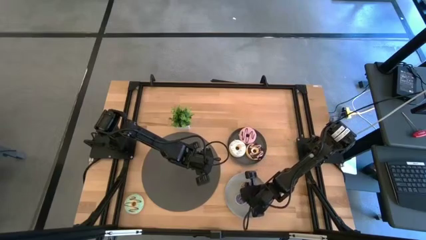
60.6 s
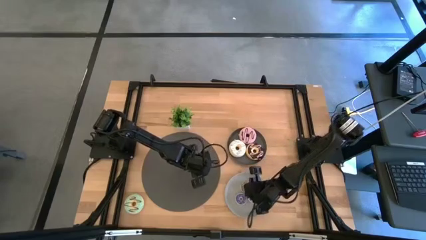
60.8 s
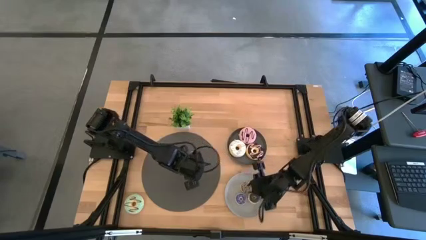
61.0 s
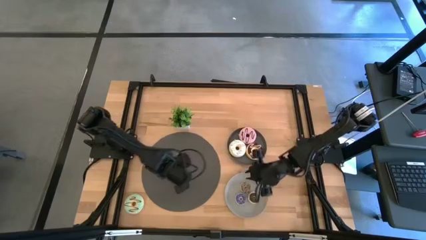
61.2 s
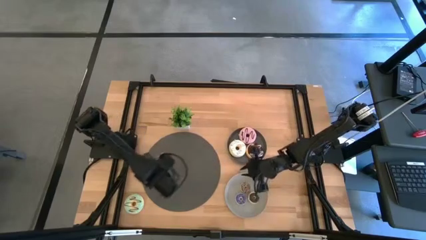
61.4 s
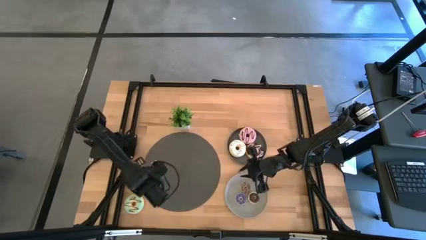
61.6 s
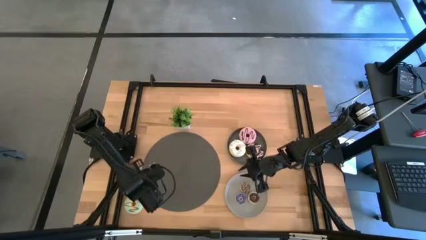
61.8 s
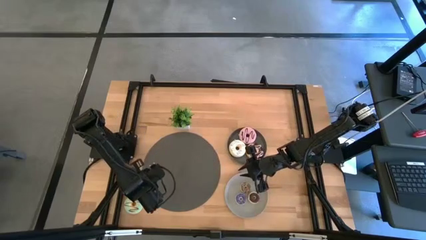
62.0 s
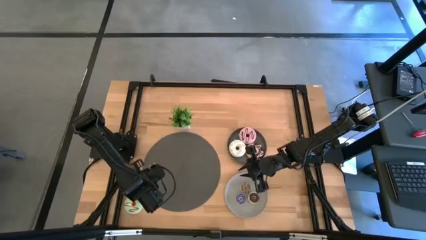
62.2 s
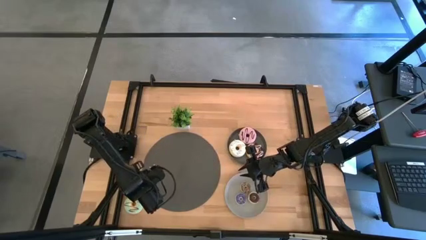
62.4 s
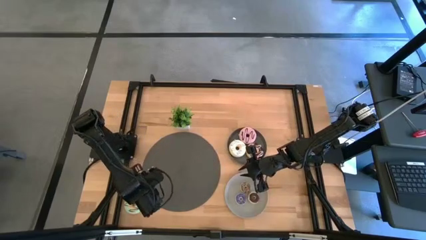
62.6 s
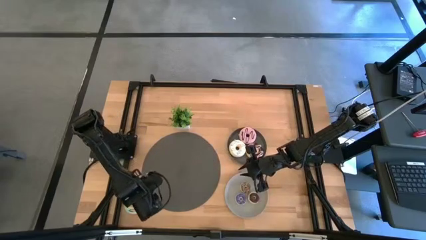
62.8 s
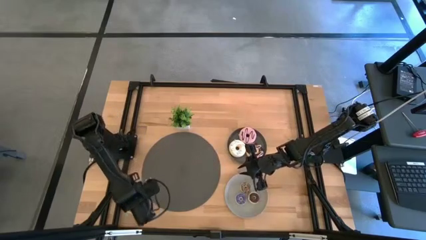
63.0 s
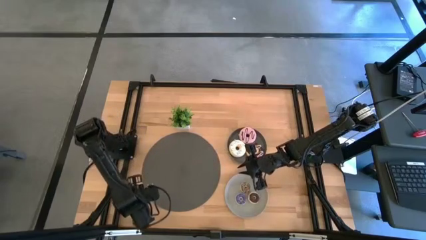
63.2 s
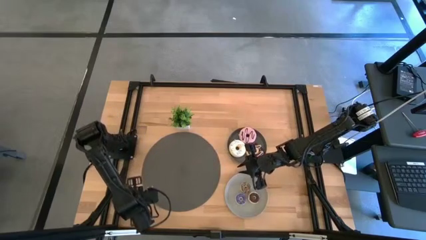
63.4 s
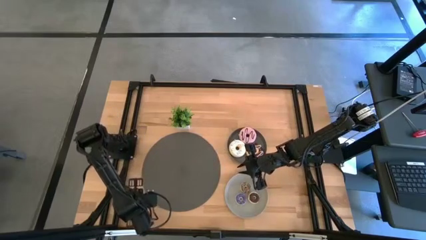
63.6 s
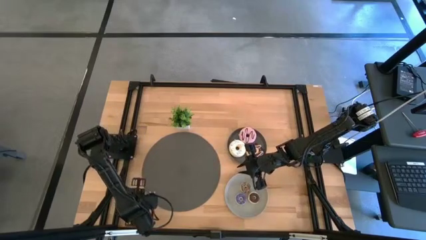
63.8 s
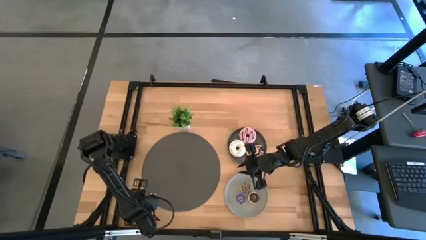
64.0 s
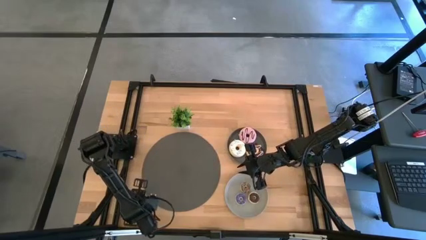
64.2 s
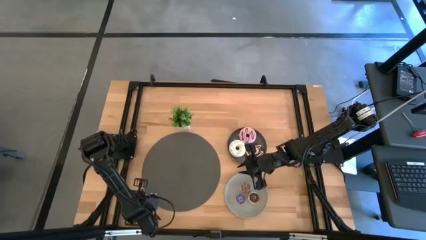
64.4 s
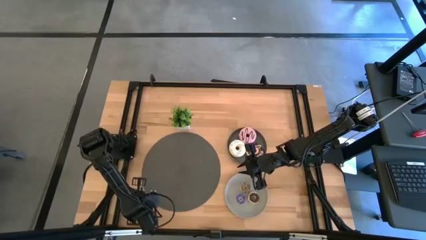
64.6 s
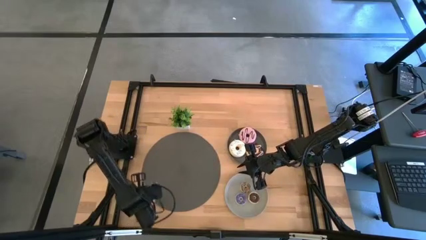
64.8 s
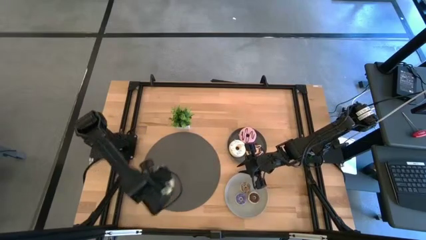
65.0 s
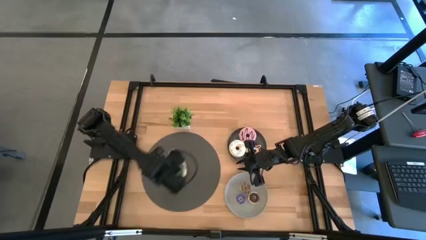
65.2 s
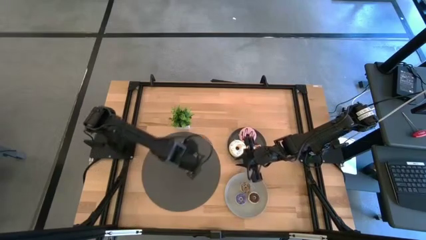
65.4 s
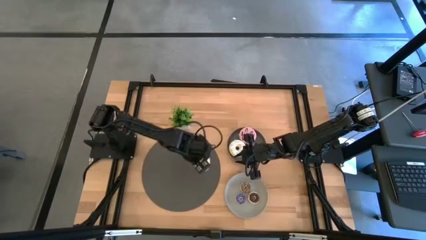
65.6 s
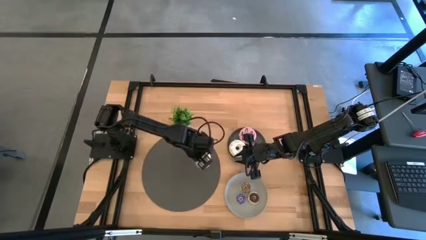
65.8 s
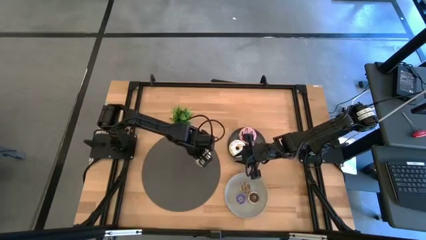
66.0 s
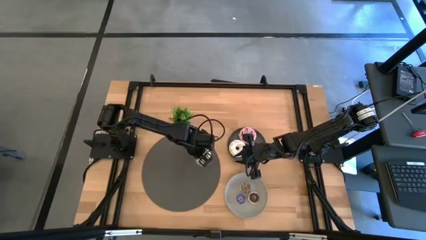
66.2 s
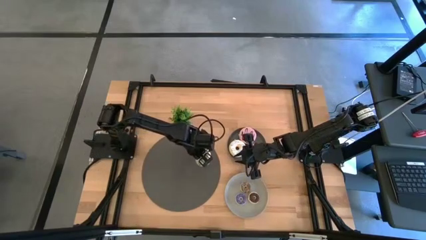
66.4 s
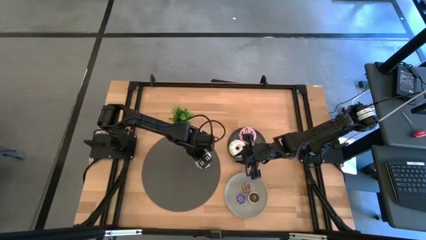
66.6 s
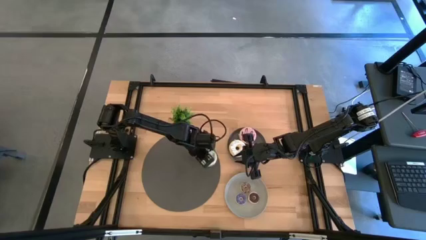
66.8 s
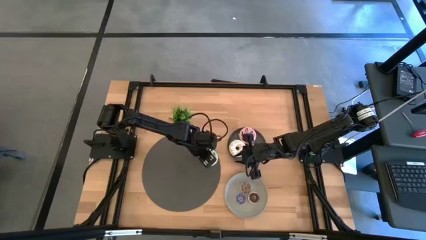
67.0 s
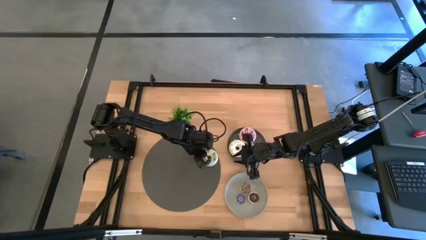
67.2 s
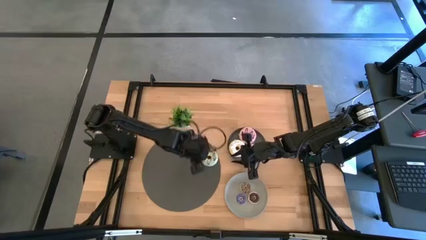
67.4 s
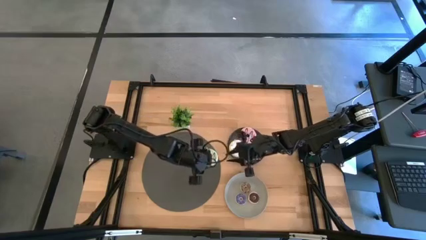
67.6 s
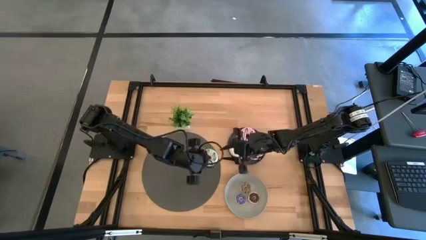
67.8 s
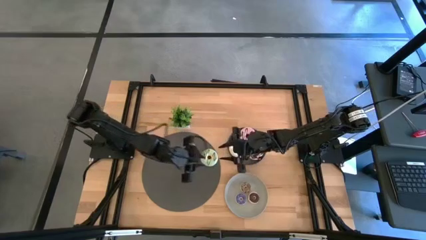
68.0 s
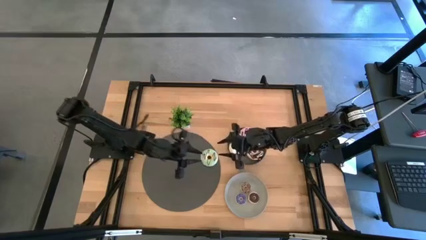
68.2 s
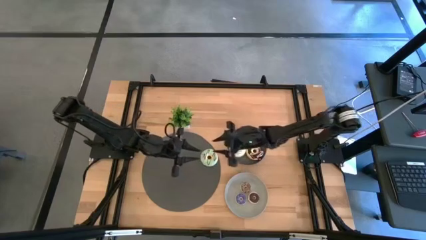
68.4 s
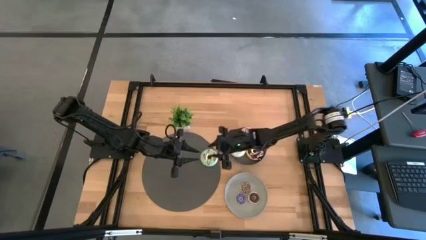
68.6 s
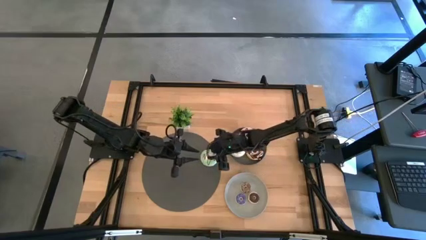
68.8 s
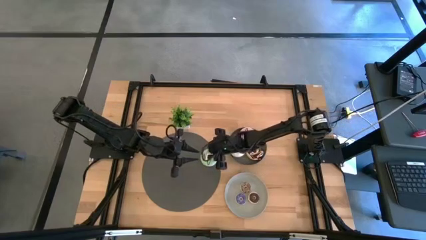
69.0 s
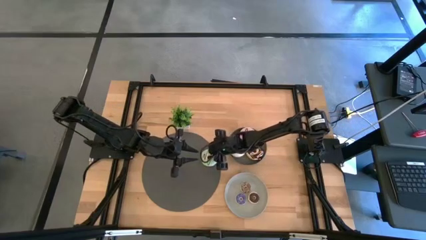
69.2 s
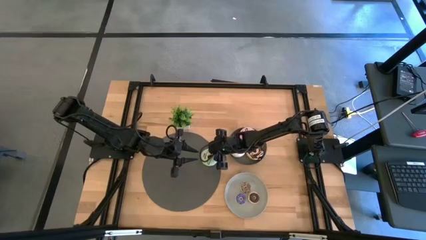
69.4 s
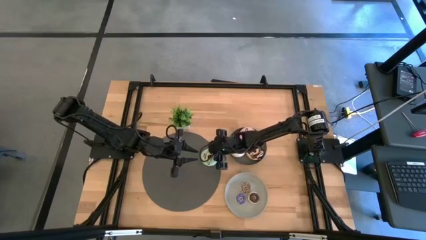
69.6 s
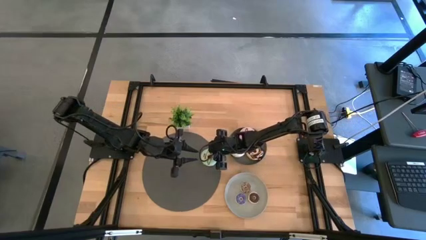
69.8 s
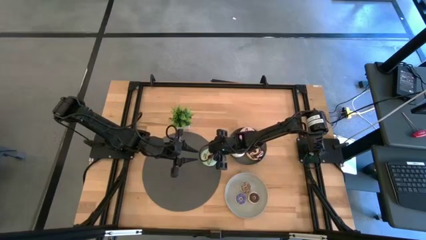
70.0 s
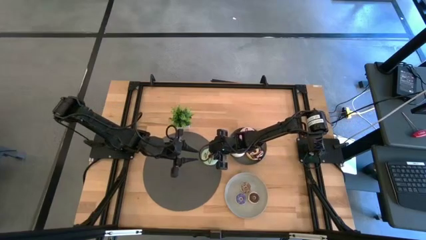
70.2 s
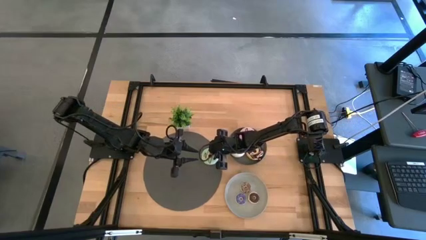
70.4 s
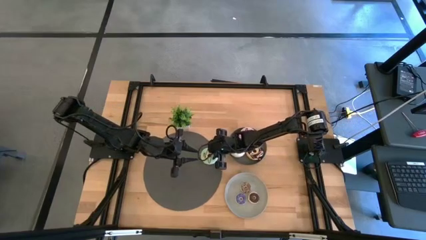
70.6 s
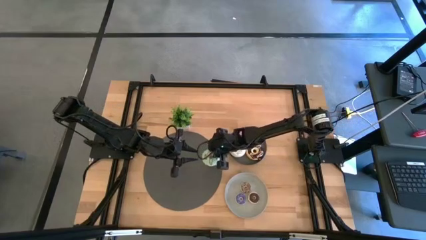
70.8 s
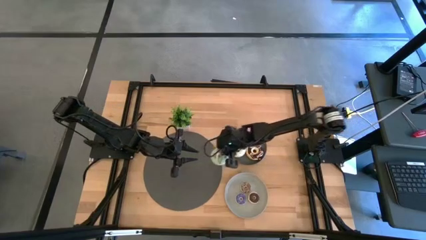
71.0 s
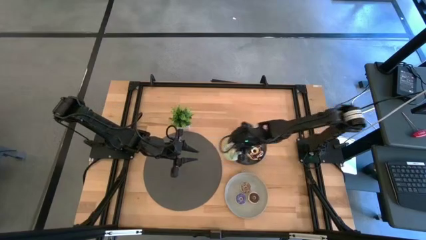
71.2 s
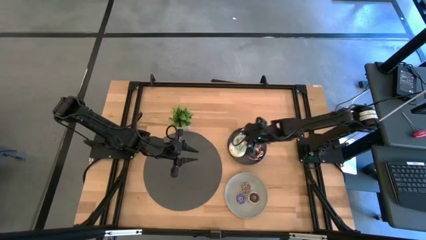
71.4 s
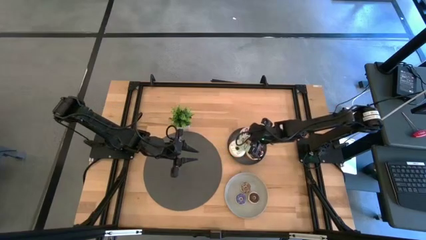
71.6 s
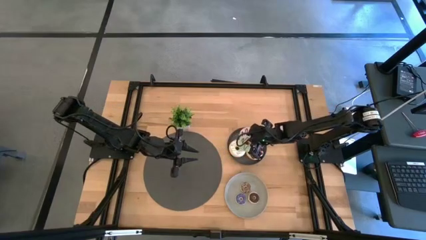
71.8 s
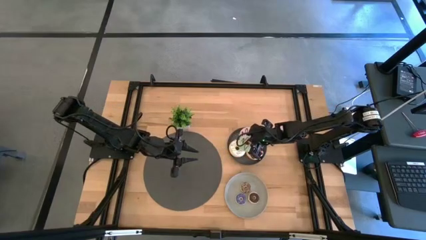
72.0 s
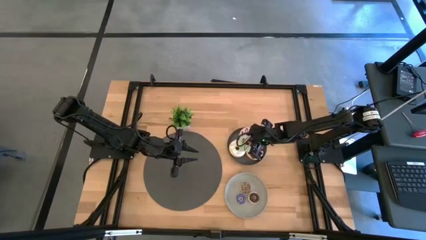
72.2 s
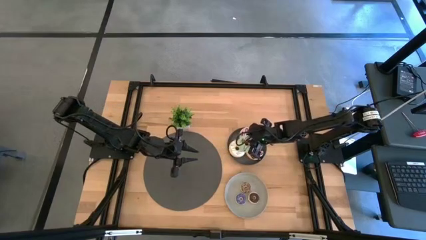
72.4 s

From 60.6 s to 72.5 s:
Task: Pick & Place donuts
Put the large light blue donut on the black plate

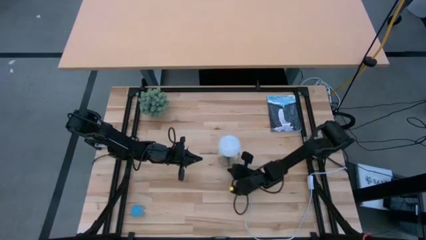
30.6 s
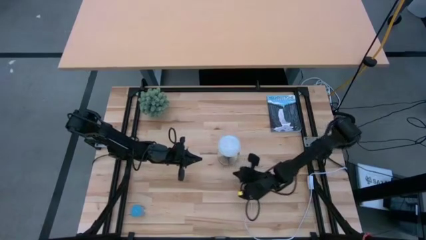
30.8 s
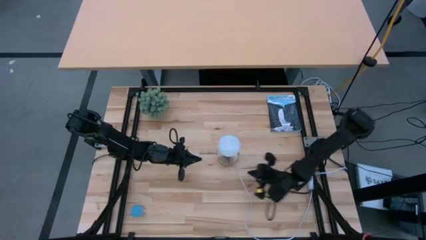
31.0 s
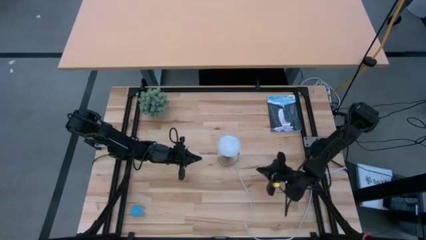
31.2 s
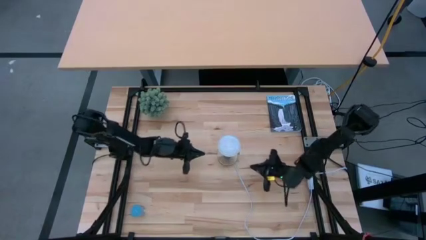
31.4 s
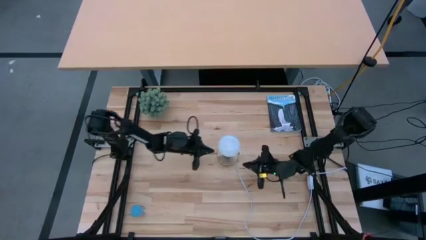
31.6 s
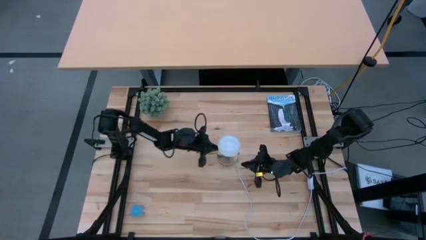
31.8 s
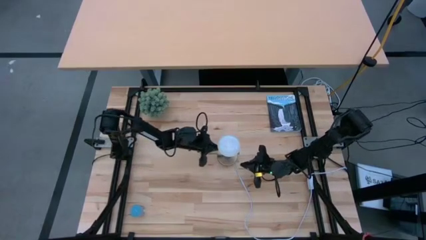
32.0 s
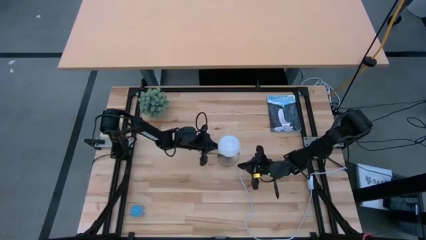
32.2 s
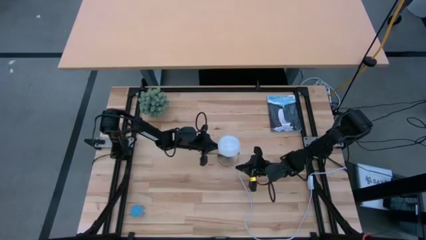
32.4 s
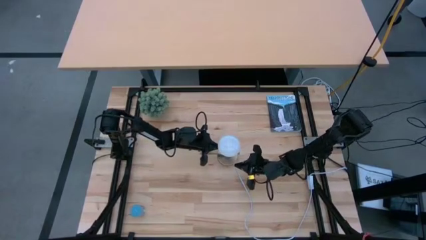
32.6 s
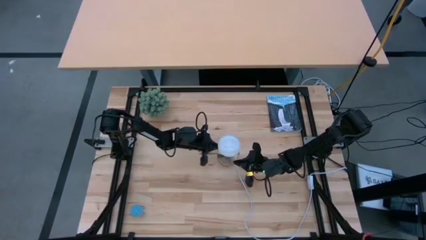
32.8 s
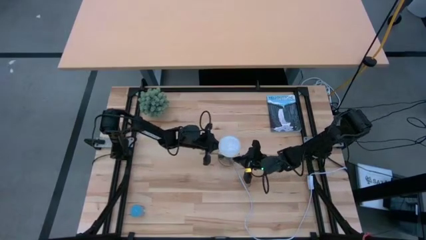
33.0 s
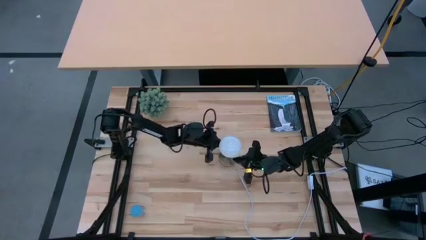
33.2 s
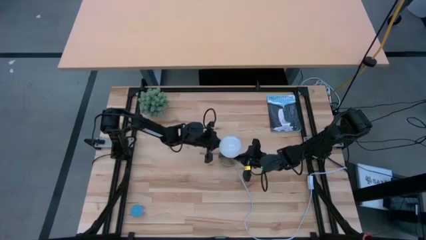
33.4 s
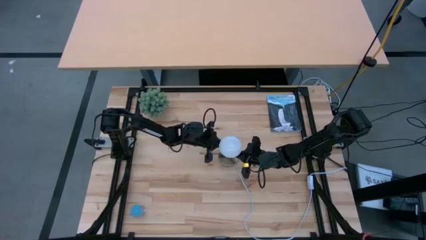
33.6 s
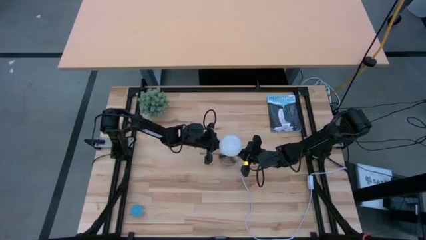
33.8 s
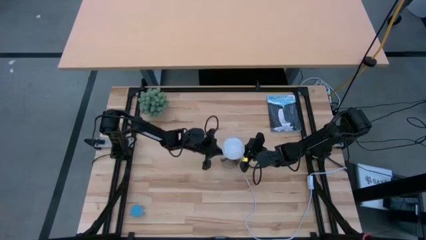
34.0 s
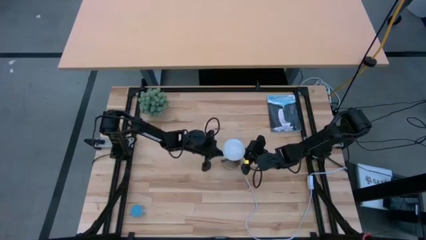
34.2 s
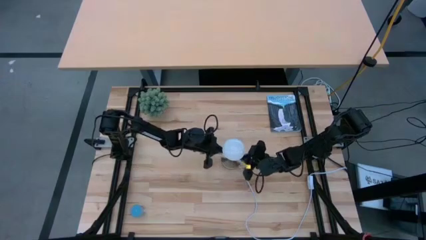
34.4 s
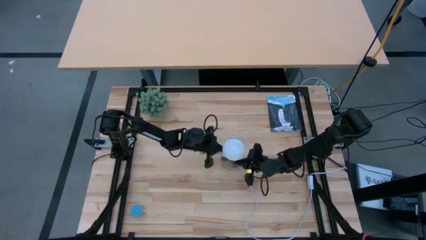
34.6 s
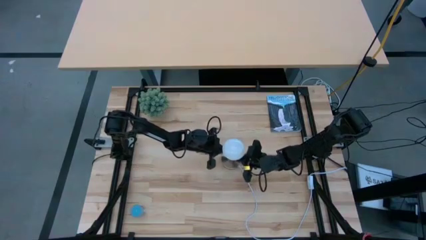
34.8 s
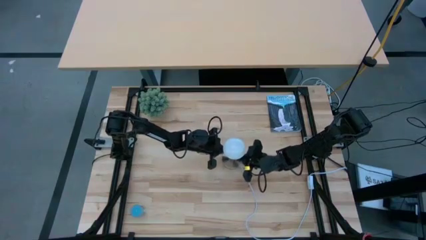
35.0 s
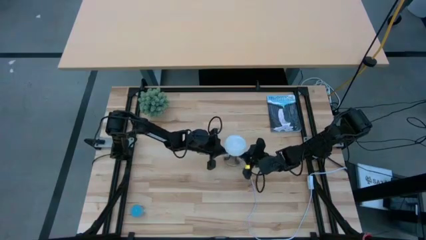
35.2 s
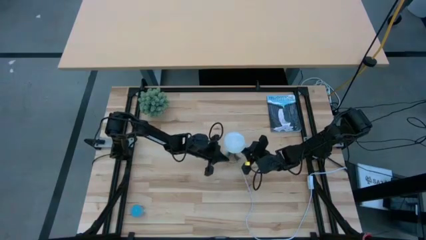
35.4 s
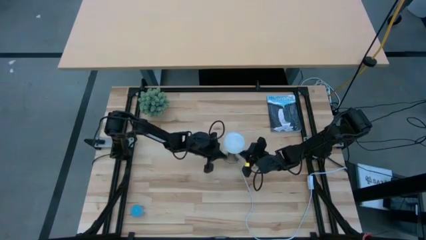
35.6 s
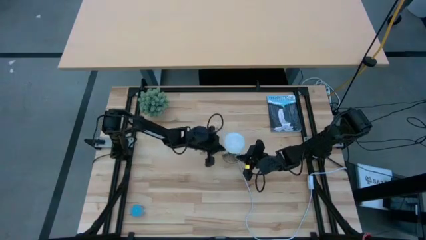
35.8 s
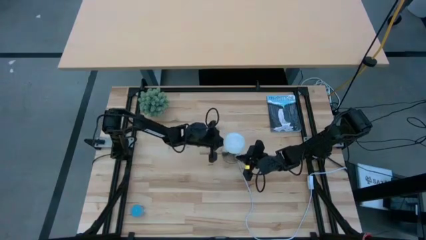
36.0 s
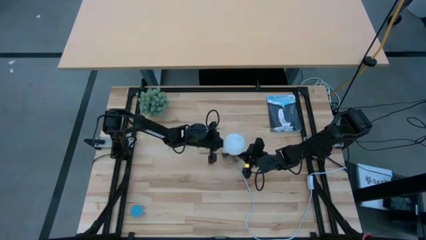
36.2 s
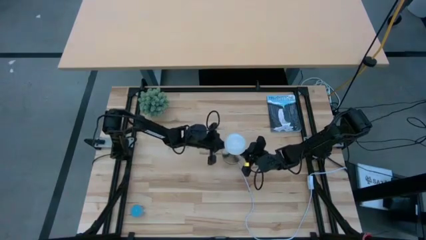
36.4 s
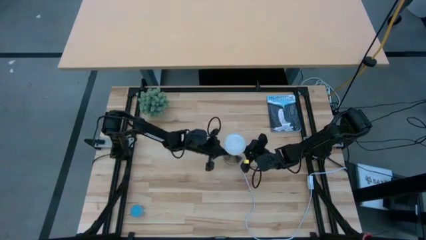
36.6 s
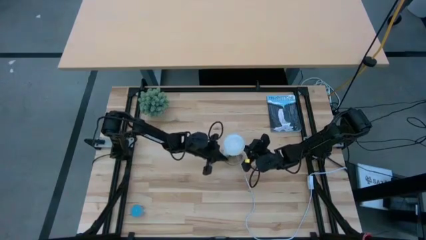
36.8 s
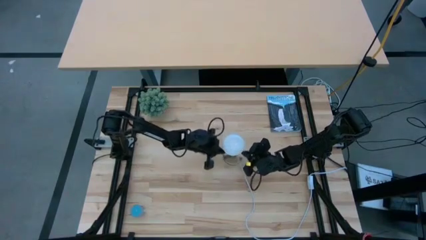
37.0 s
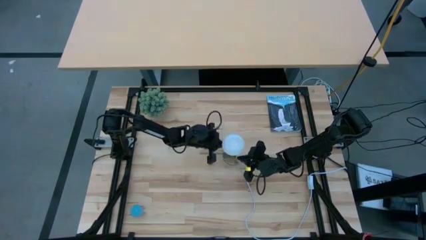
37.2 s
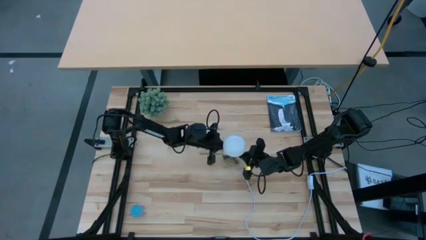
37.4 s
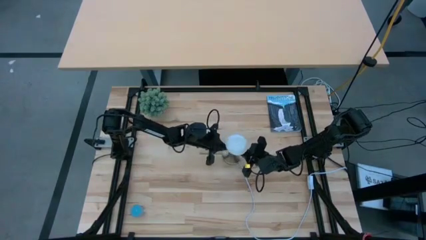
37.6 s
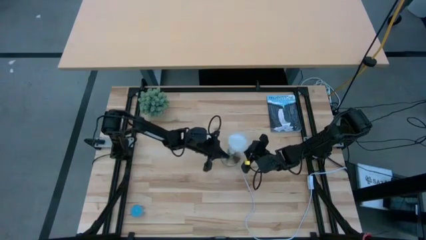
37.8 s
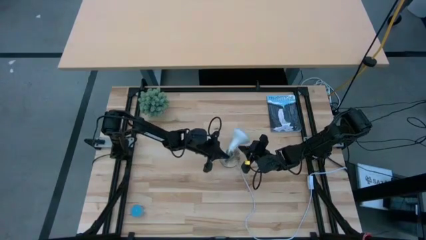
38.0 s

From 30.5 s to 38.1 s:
Task: Screw lightbulb
Remove the lightbulb from the lamp
